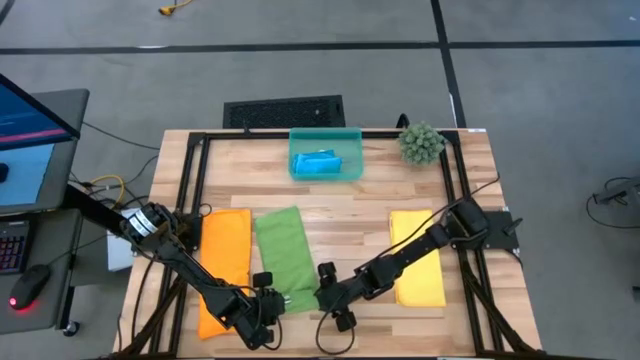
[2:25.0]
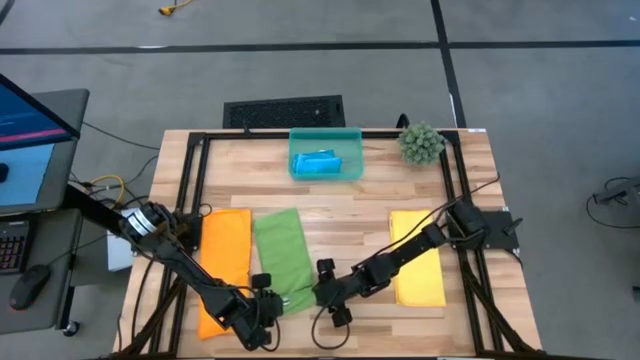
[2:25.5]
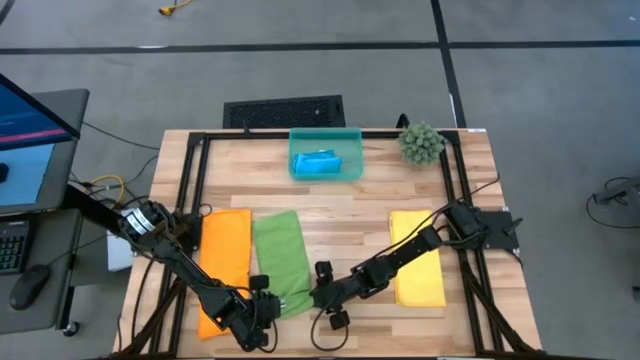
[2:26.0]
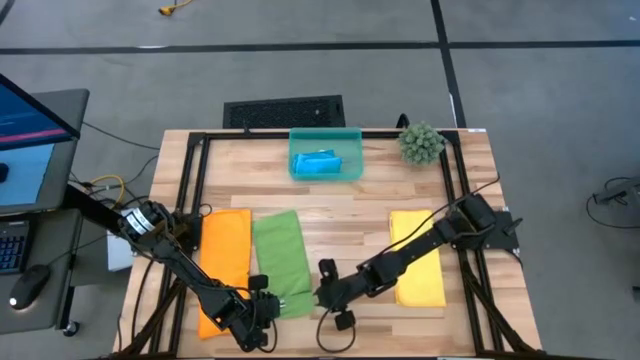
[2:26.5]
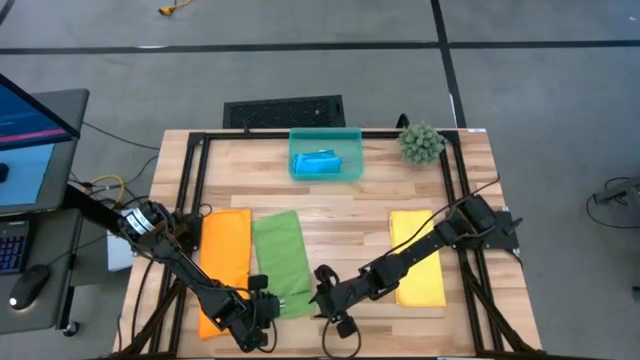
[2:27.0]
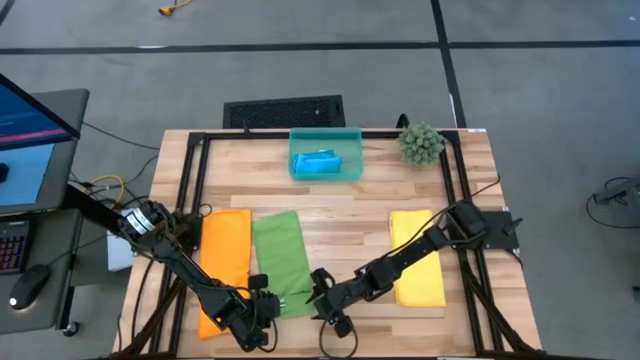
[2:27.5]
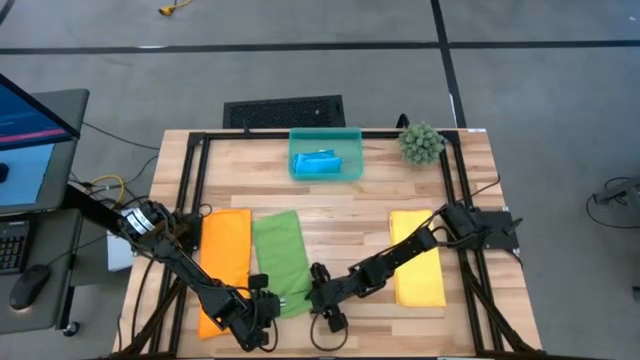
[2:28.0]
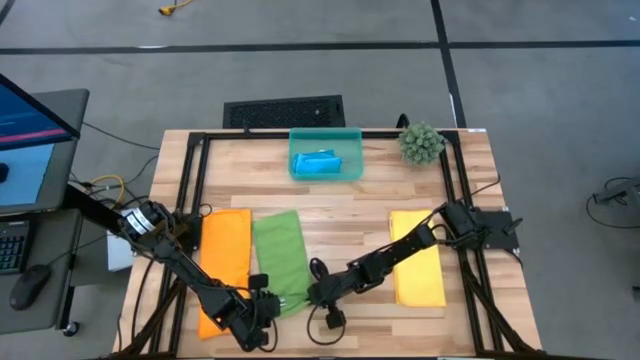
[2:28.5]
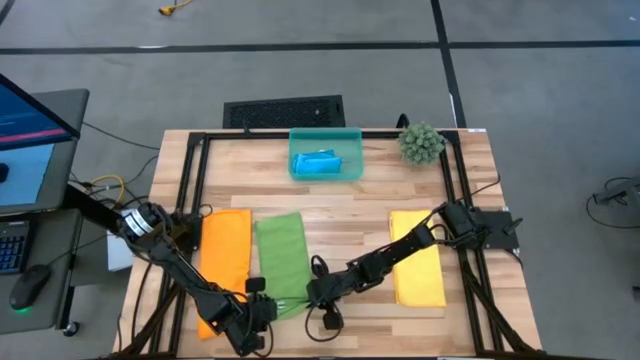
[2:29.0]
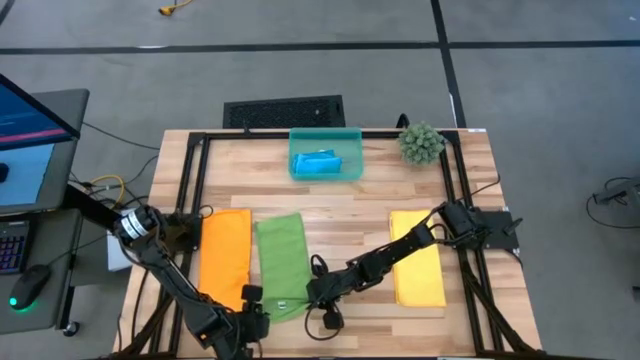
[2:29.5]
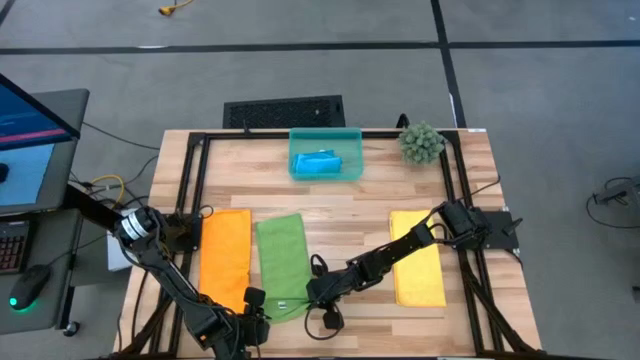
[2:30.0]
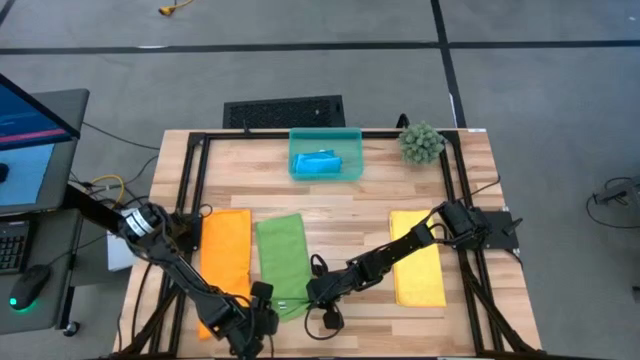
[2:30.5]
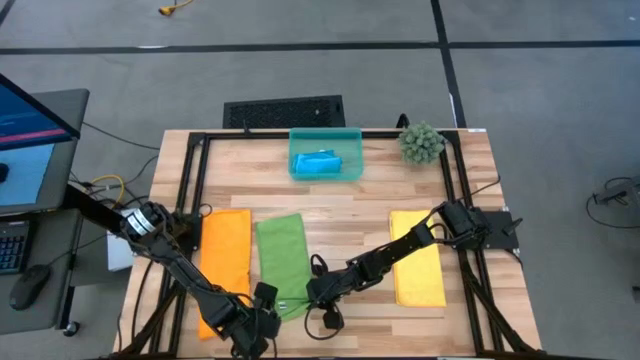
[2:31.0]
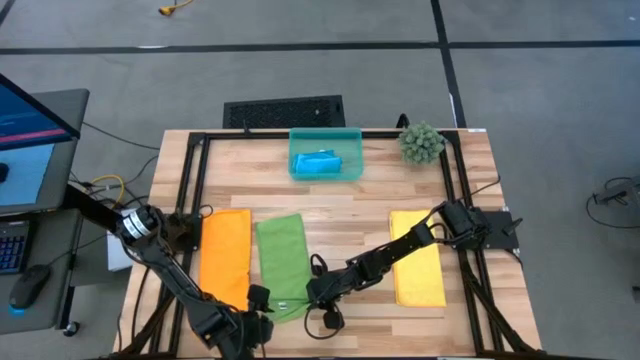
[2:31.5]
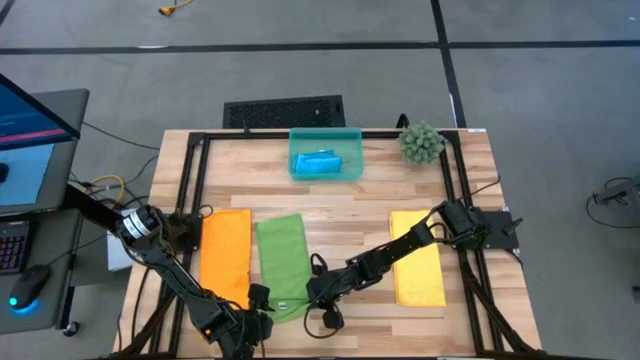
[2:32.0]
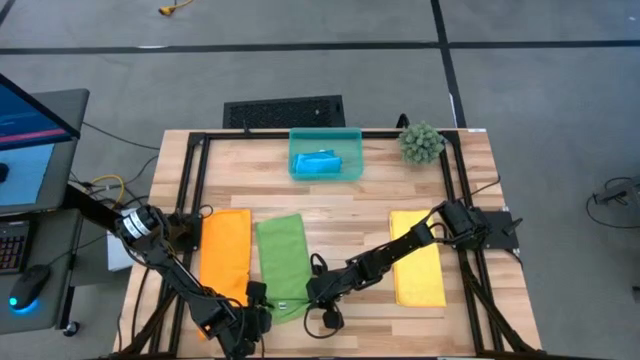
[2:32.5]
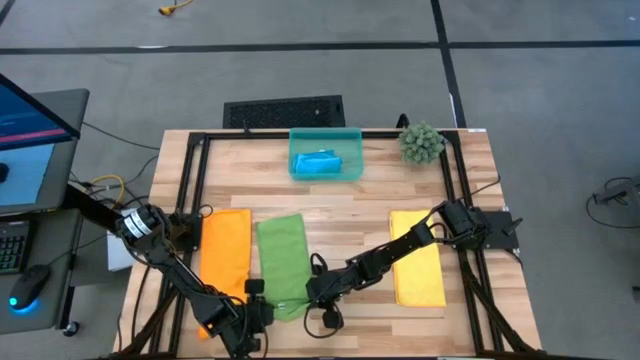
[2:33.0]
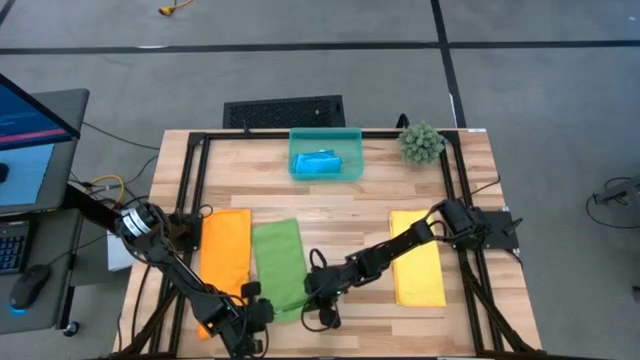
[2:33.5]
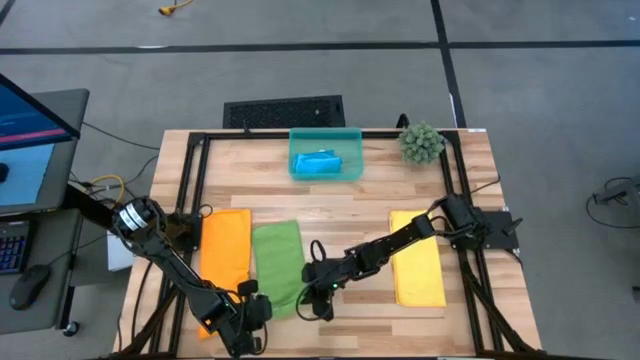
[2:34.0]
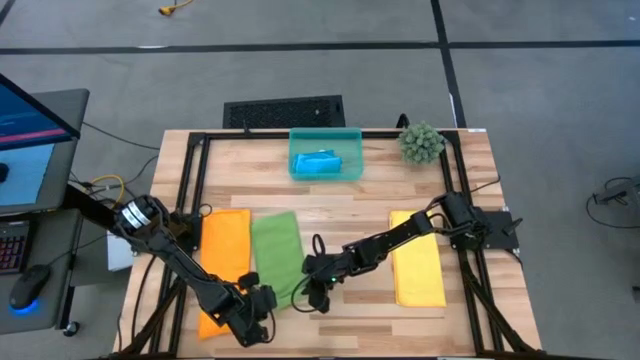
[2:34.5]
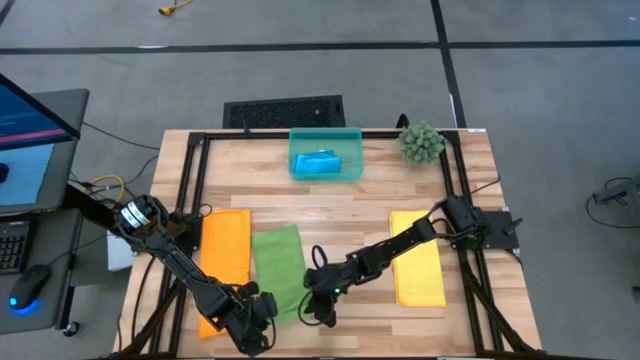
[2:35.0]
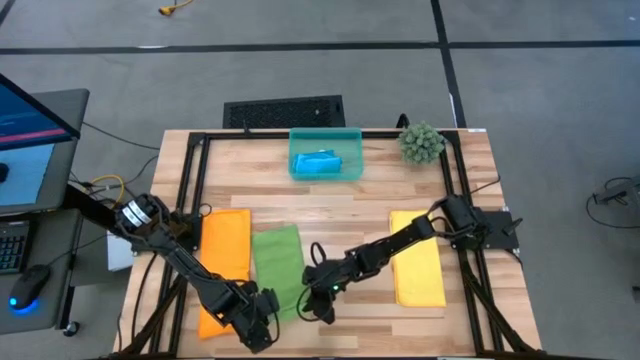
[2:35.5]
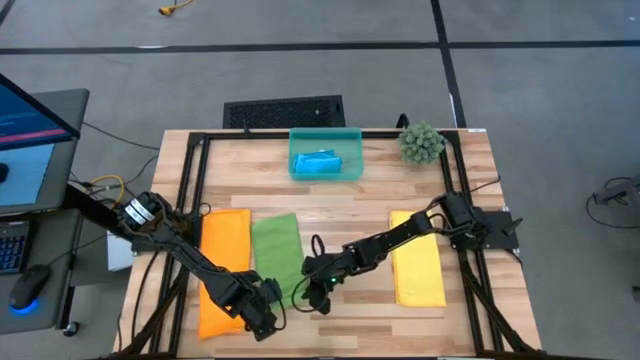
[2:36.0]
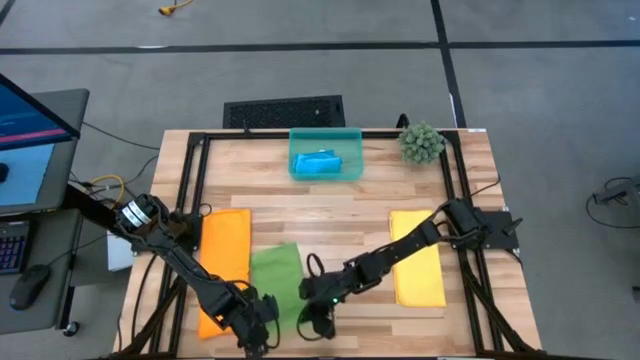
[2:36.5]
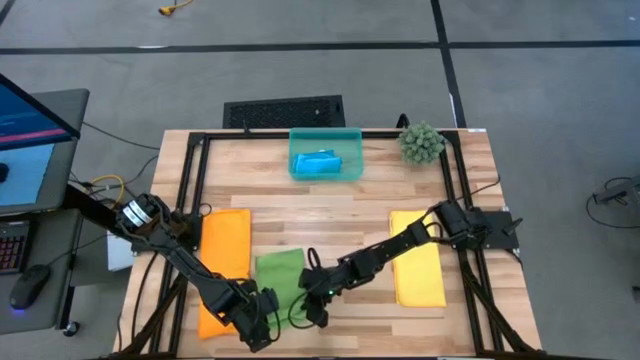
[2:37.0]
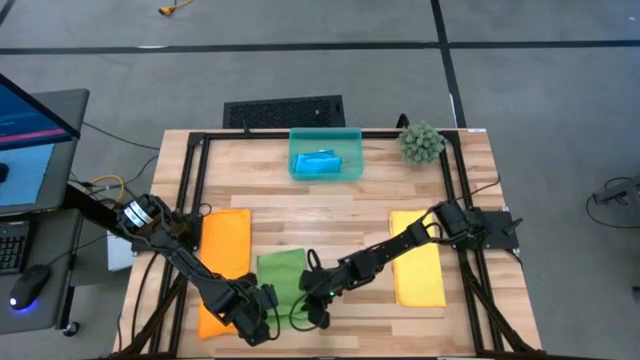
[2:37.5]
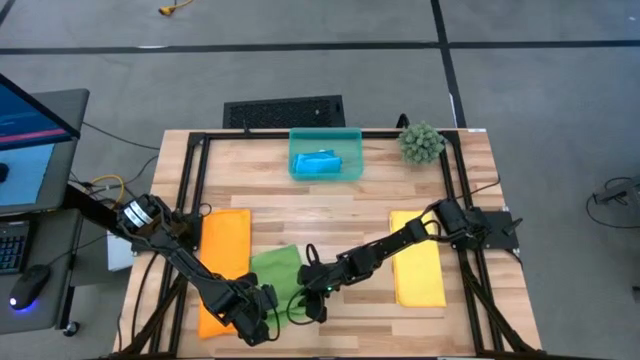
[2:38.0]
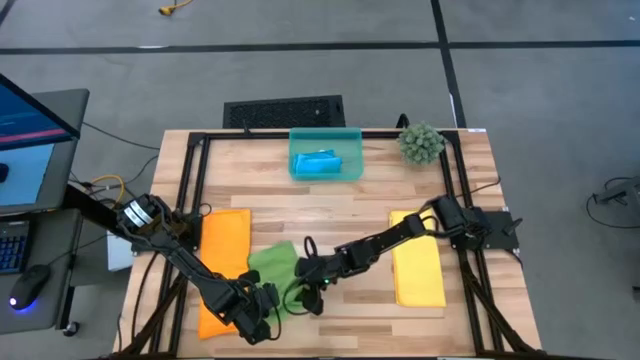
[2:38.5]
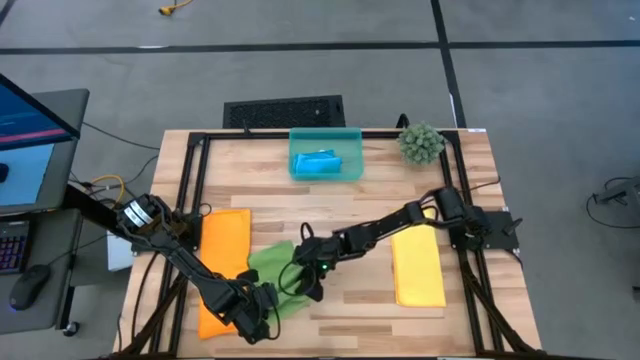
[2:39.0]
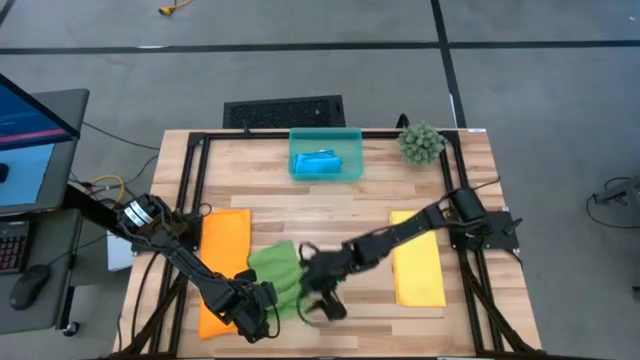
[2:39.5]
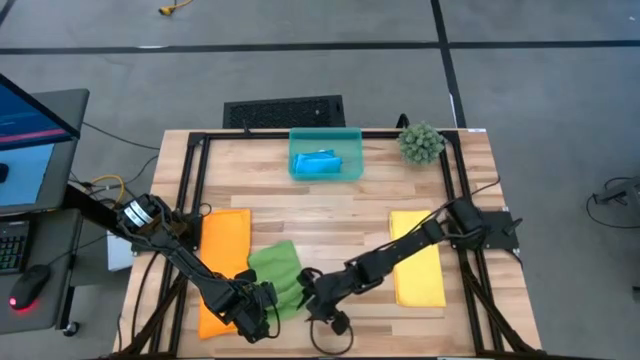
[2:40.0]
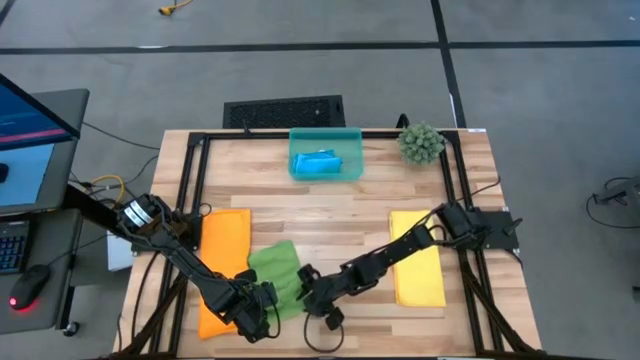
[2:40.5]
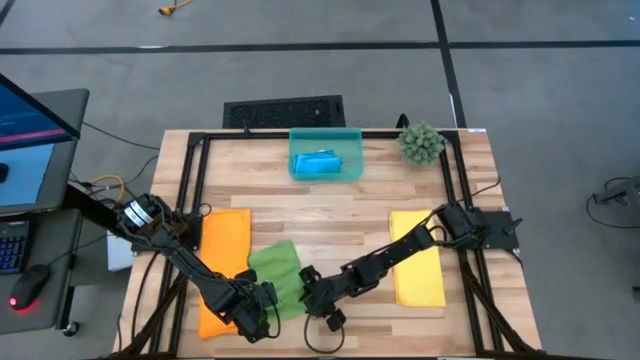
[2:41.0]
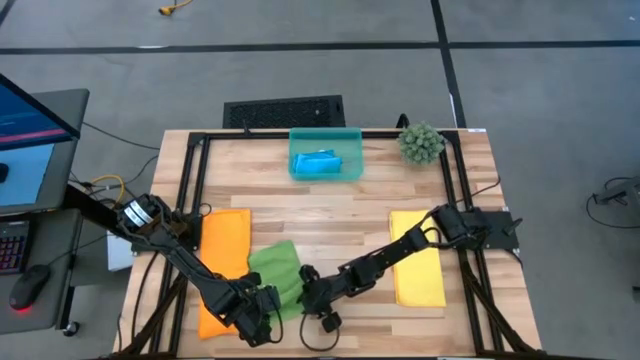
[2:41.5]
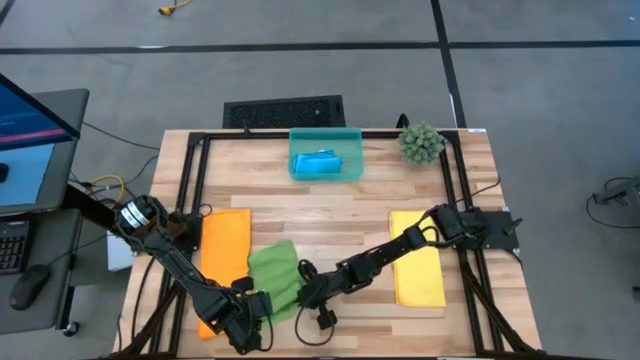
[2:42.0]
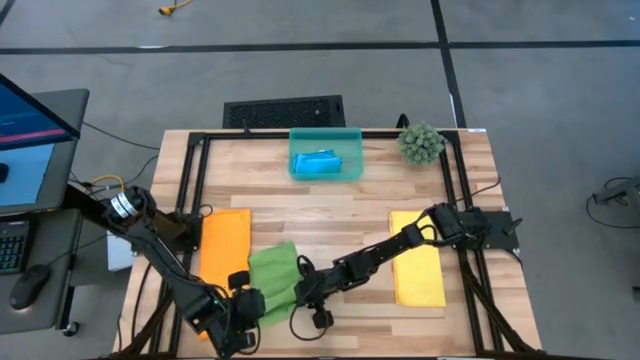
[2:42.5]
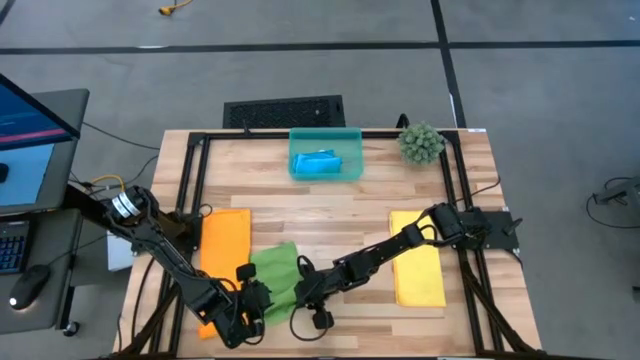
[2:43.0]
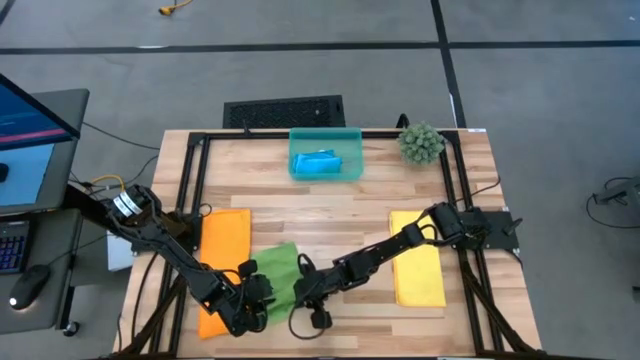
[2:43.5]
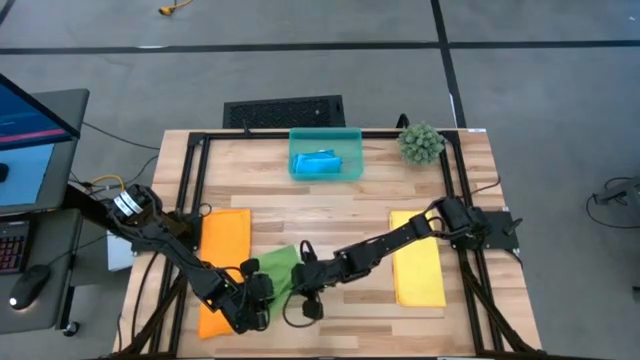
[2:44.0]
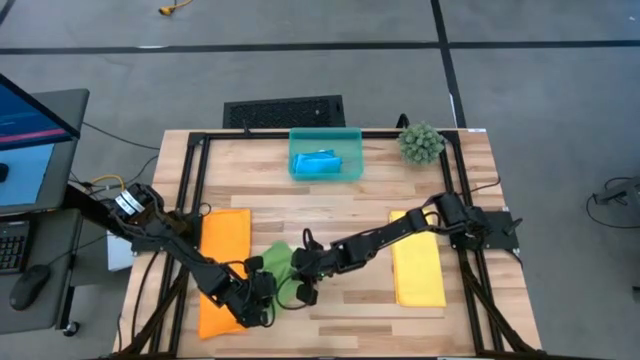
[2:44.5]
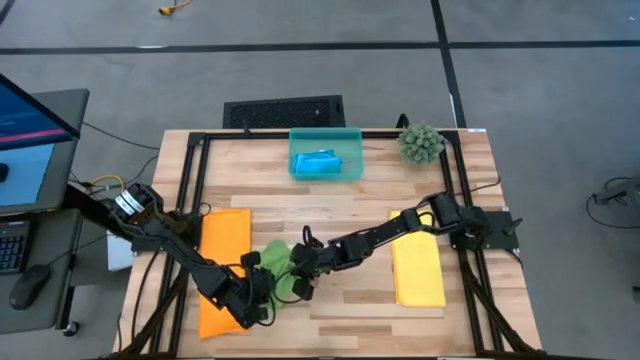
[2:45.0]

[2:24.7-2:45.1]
Task: Roll microfiber towels into tight, uniform cylinder then place into a basket
Roll the green towel
